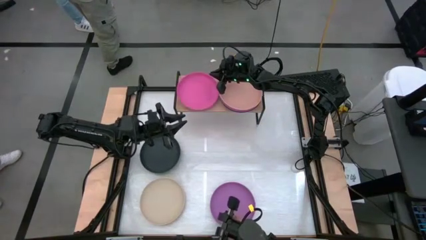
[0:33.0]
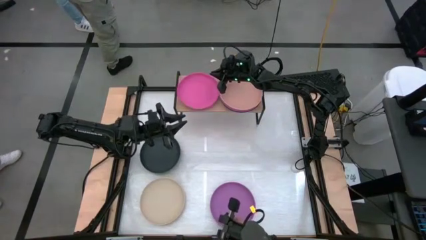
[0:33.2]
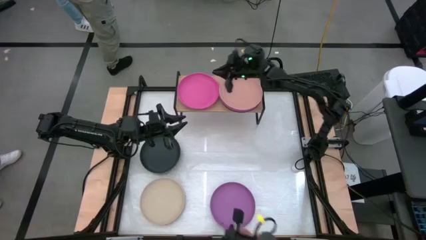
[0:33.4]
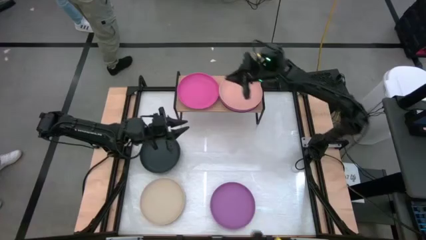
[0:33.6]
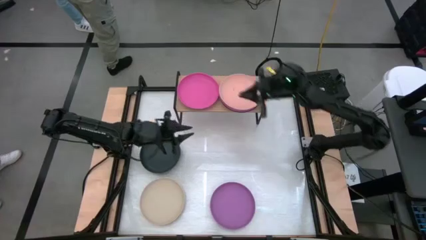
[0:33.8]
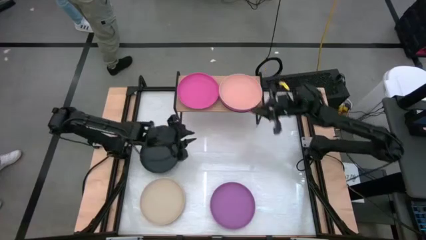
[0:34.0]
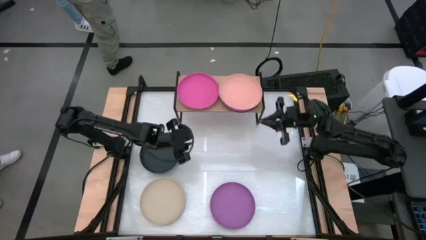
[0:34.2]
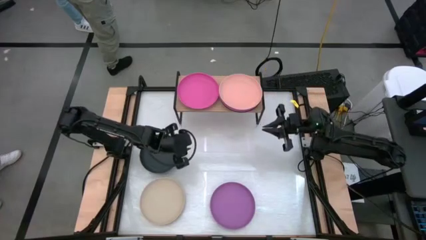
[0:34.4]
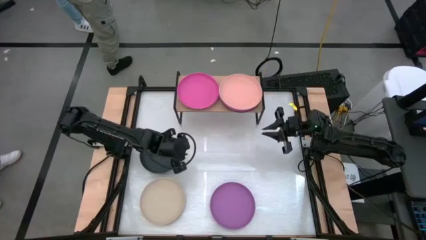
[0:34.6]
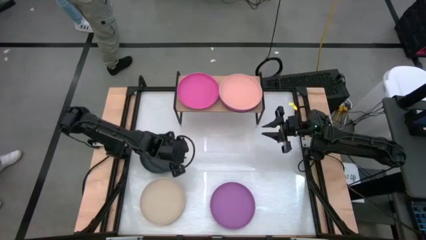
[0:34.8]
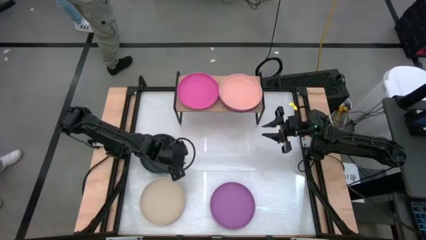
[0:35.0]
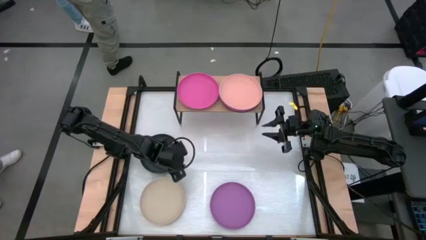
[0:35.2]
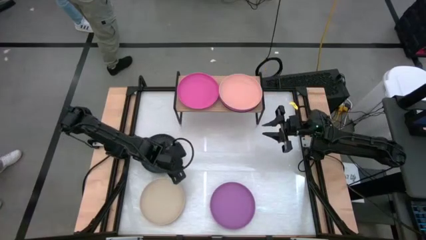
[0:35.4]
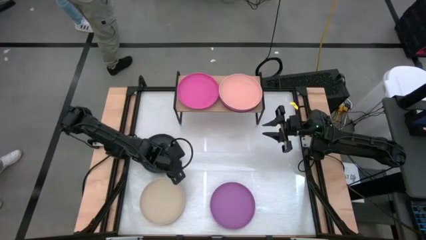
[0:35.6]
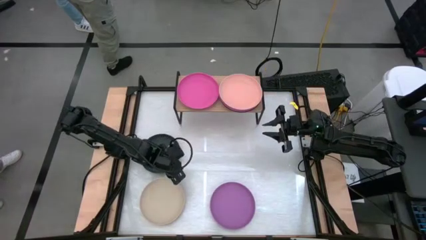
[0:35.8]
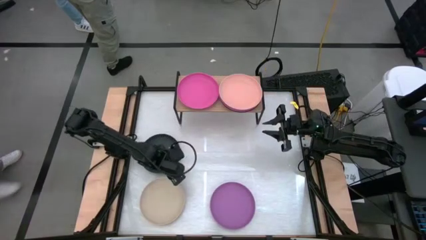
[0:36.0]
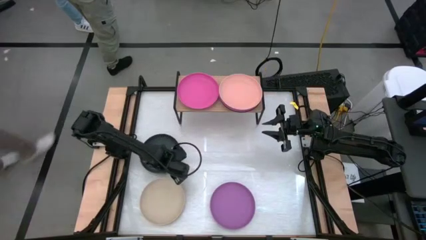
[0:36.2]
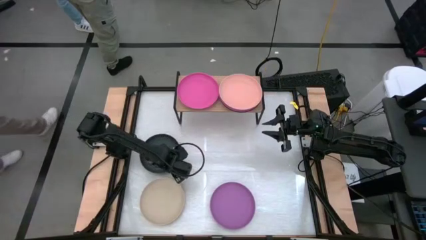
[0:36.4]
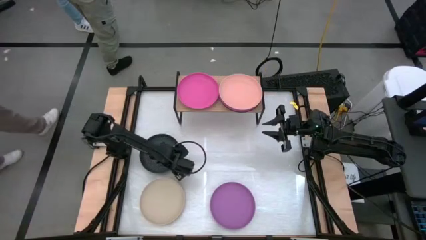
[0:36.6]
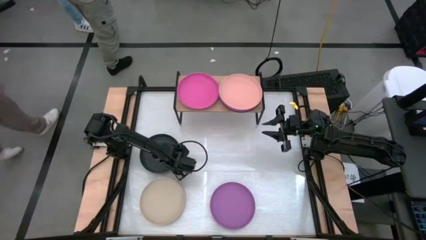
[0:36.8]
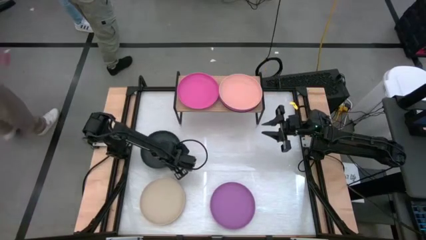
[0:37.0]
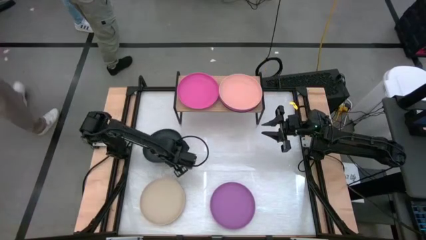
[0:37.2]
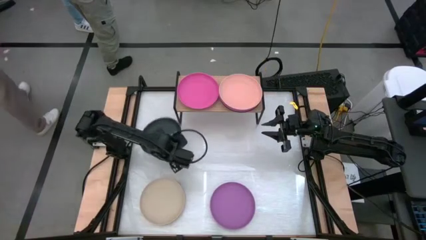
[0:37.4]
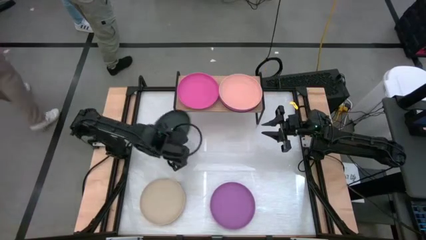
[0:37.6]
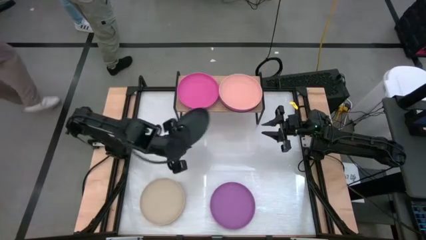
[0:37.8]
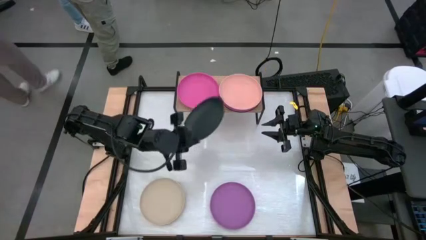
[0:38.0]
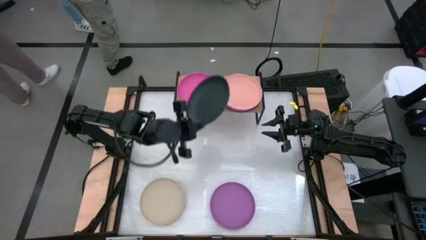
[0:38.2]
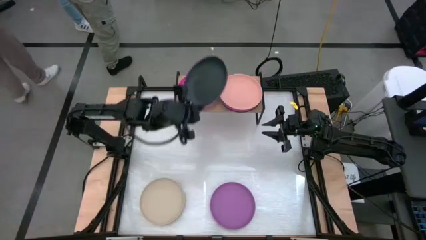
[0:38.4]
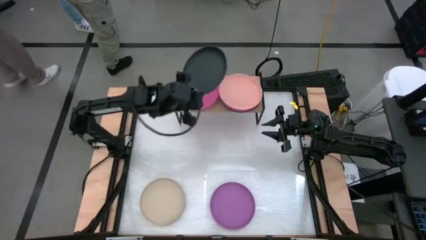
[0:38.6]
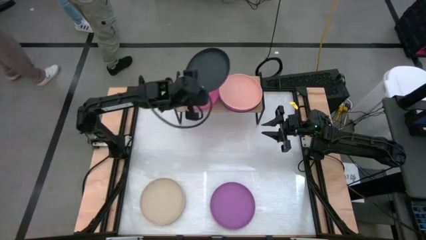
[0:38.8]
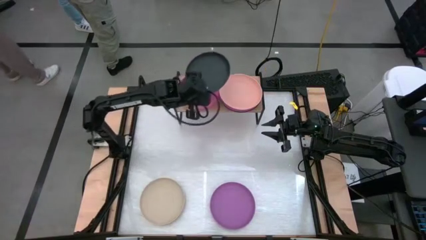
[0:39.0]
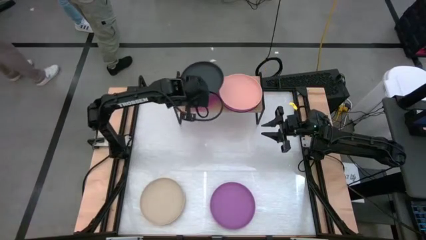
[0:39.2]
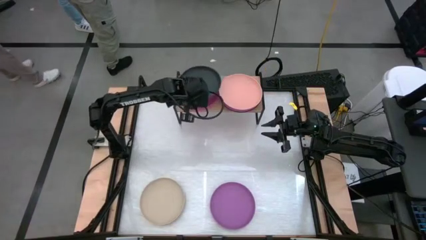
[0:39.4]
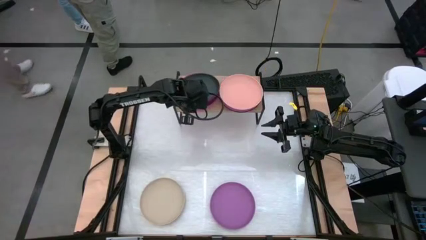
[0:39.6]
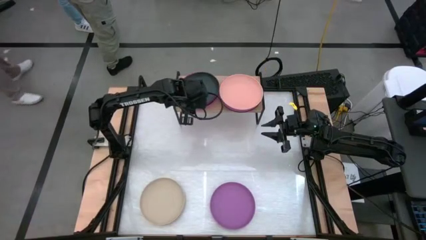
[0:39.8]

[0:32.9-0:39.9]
Task: Place and stack plates onto a shelf
Stack the black plate on top of the pink plate on the shelf

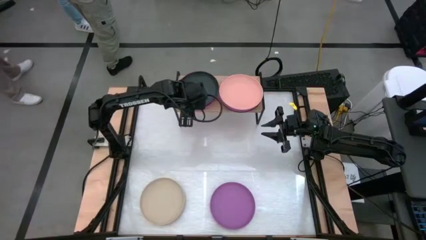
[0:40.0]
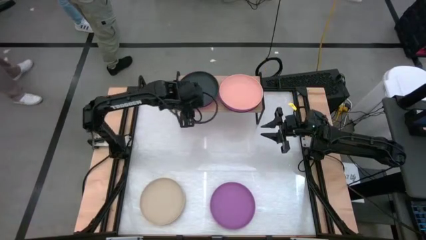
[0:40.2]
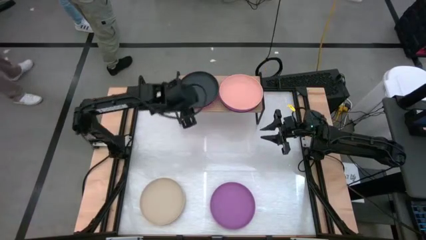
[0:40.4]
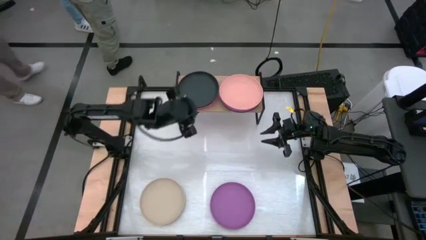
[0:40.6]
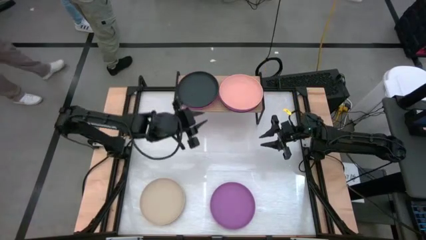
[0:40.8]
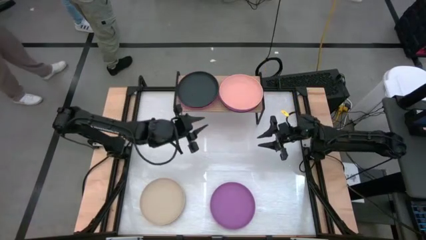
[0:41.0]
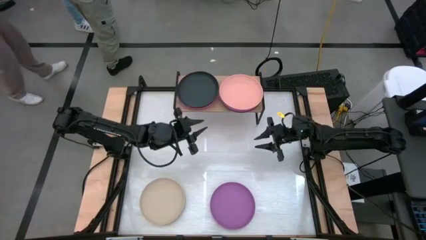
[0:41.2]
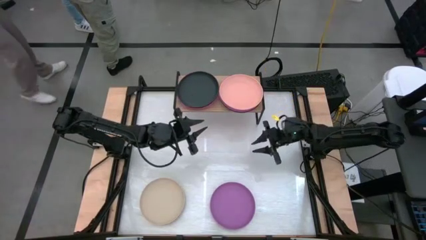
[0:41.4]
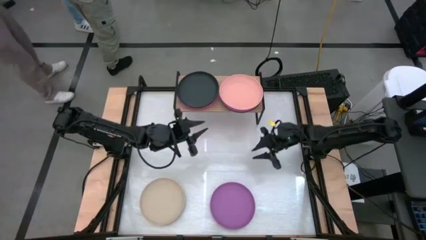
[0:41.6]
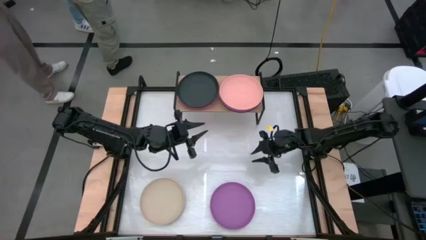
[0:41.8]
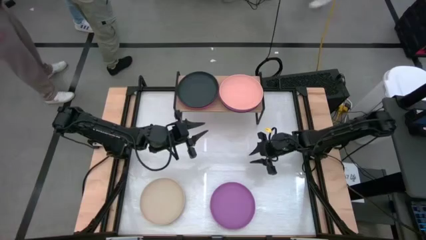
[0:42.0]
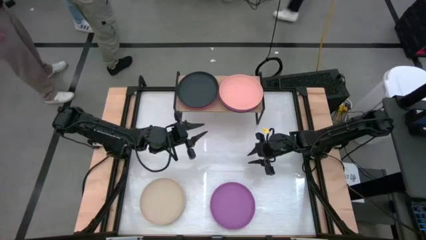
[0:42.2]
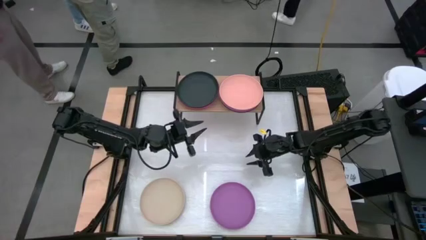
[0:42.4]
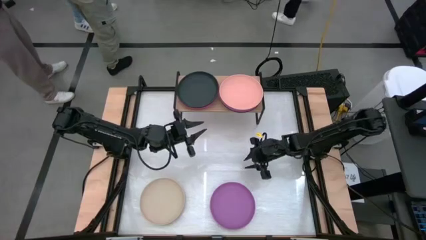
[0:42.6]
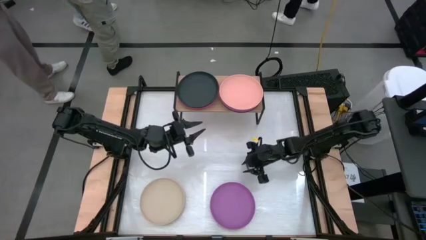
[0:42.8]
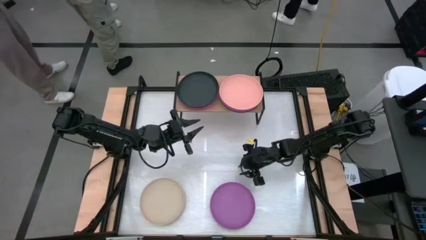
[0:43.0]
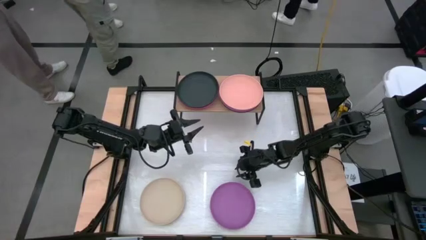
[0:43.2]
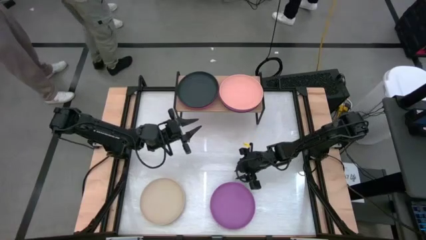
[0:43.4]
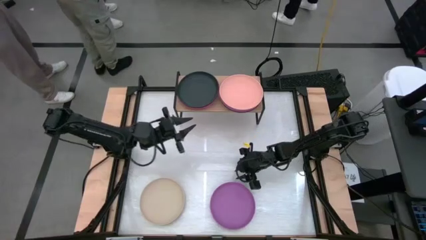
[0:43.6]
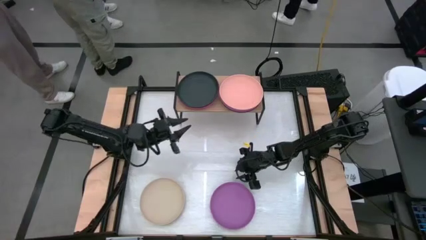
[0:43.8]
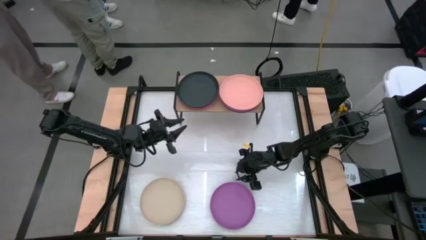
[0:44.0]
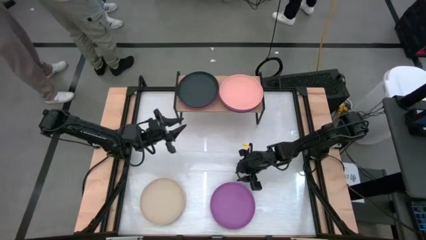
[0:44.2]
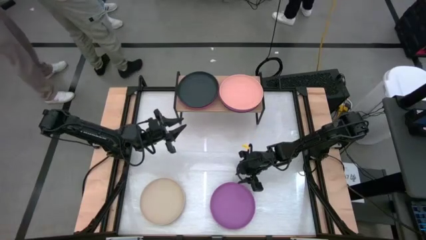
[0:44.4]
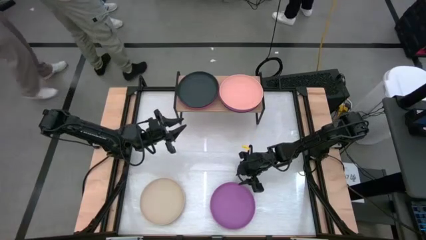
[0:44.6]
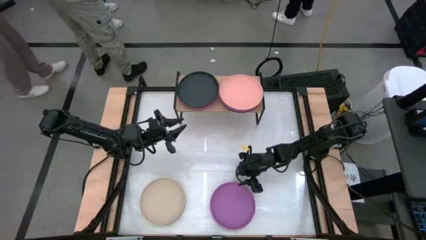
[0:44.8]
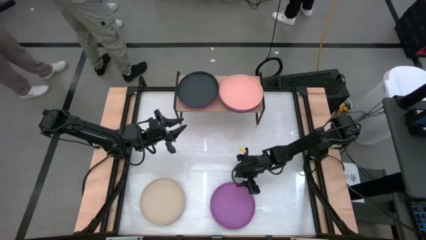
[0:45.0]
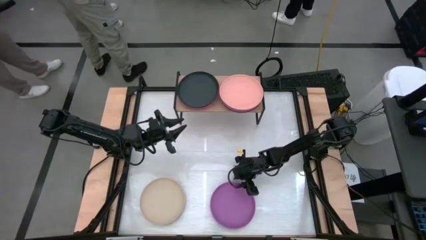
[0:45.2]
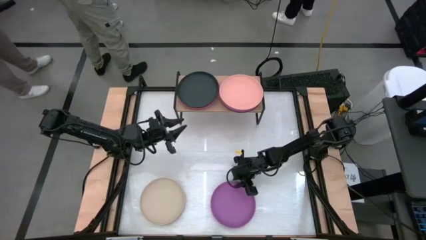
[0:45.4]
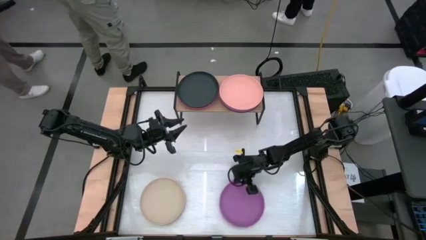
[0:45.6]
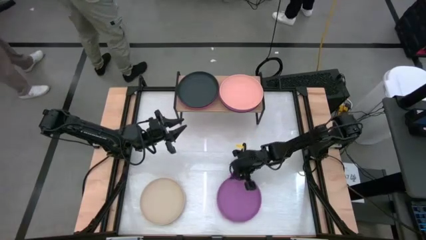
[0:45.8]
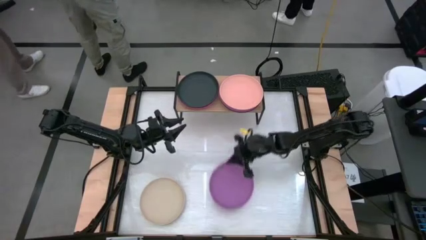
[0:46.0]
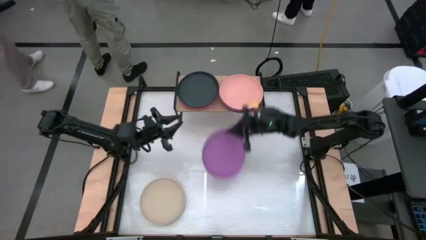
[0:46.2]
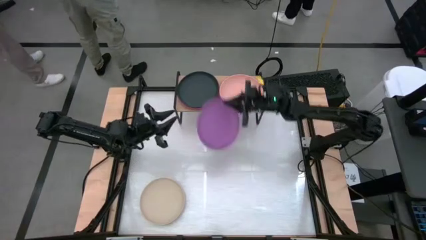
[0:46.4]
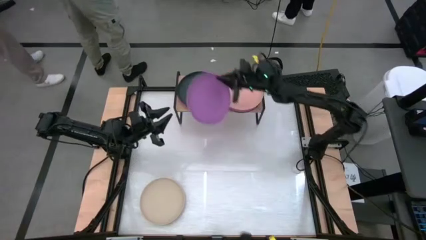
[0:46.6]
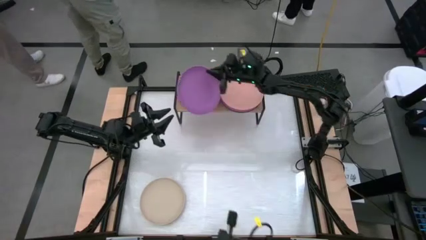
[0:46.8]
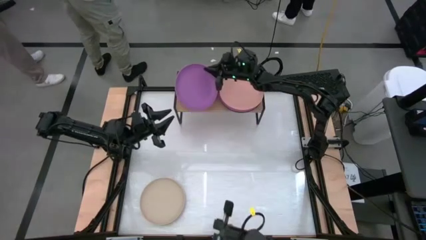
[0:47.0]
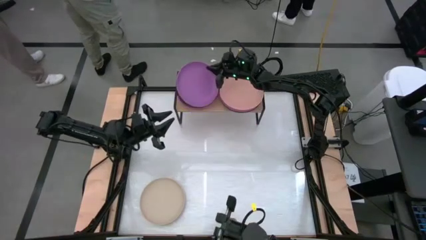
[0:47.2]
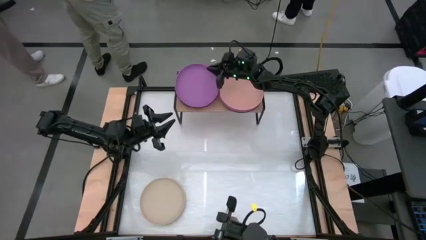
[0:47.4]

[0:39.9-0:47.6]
Stack the purple plate on top of the black plate on the shelf

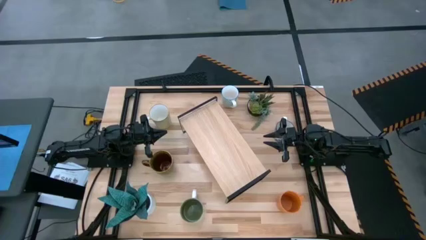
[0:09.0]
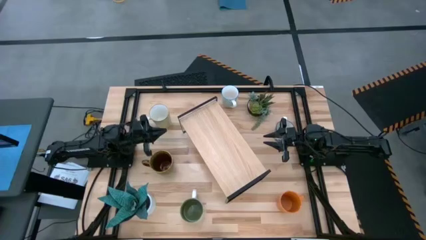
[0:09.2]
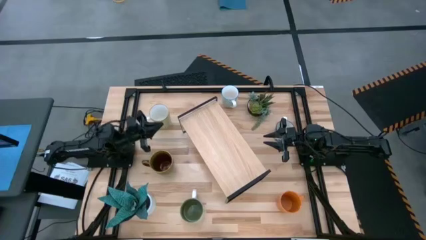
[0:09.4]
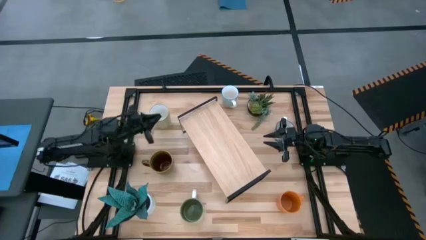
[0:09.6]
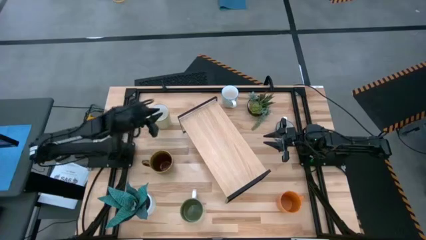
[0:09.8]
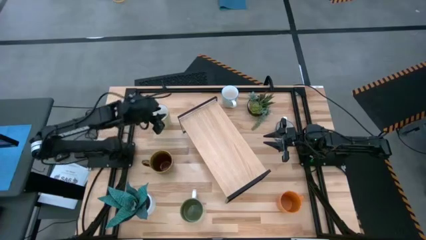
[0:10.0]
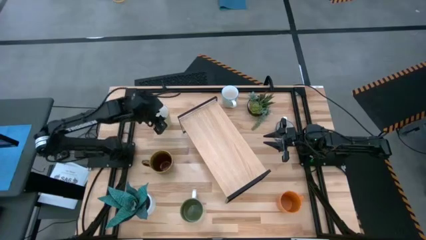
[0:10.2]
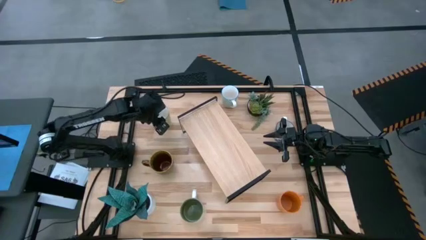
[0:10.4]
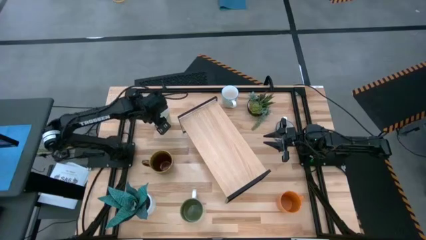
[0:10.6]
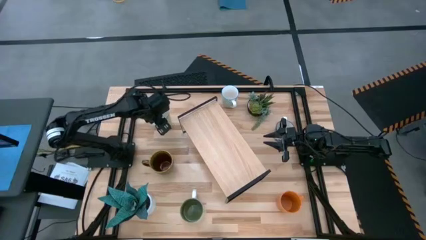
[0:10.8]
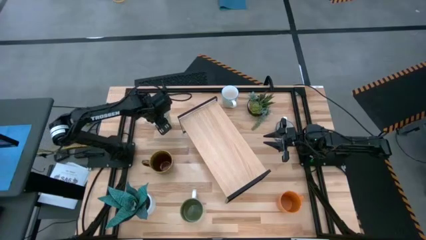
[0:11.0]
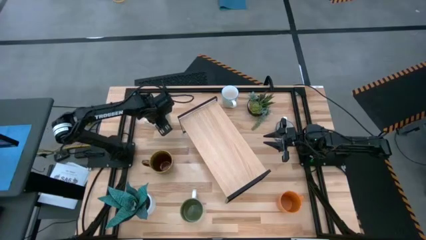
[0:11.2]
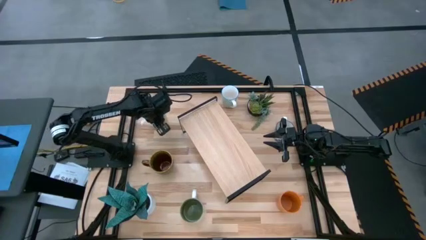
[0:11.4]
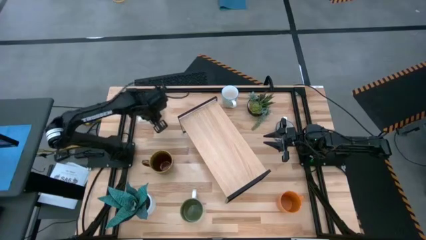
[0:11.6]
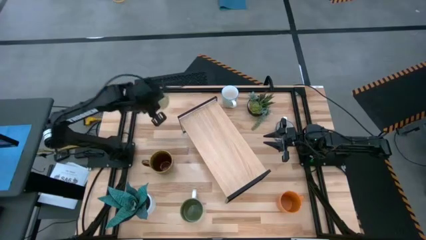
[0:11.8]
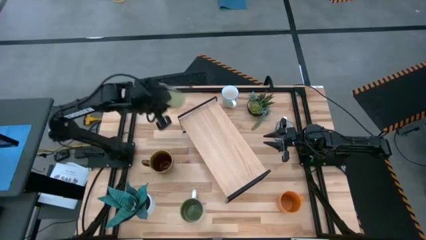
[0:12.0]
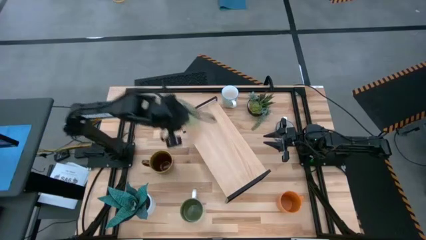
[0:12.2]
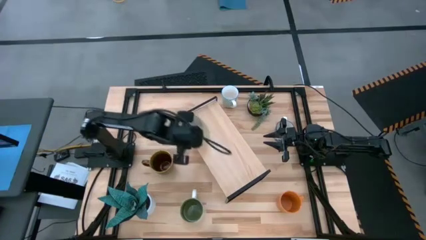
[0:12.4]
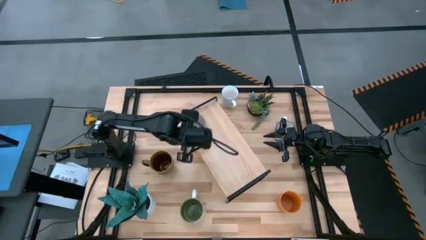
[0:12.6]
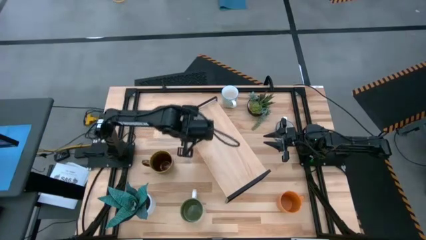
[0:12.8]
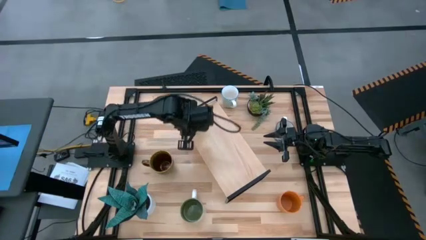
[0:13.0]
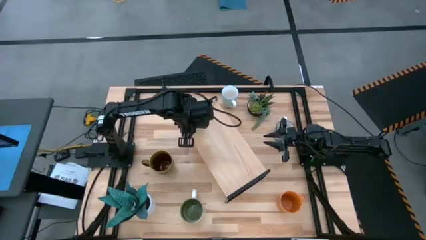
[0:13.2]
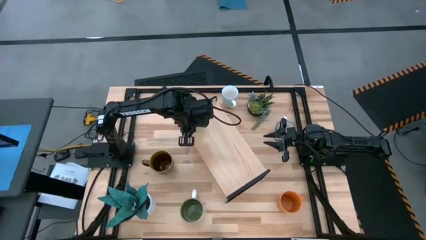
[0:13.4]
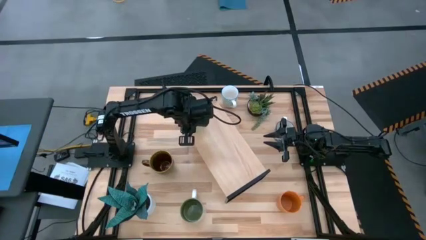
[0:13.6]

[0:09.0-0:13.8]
Task: Place coffee mugs
Put the light green mug on the shelf
